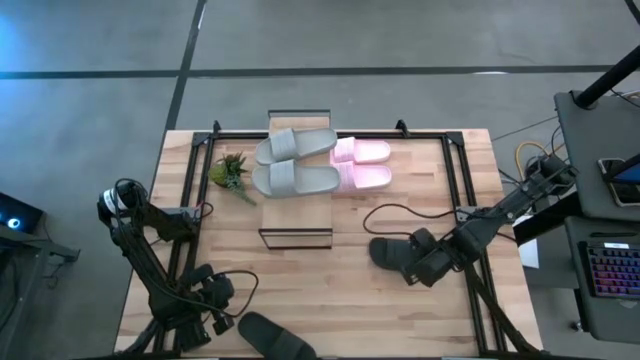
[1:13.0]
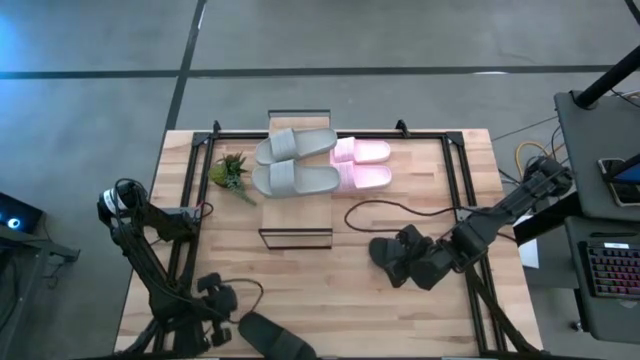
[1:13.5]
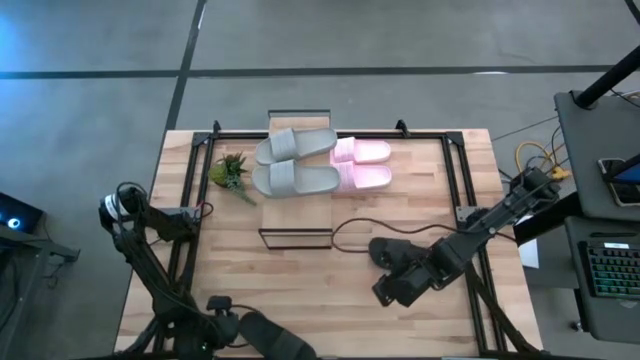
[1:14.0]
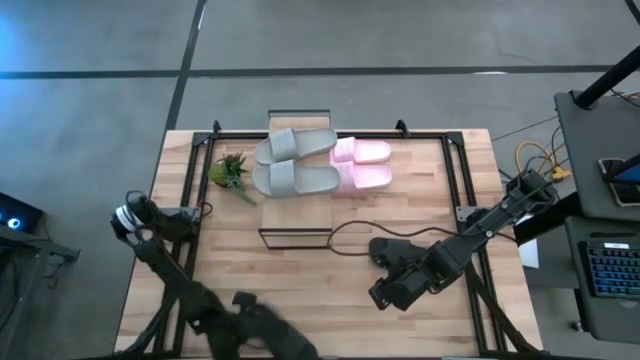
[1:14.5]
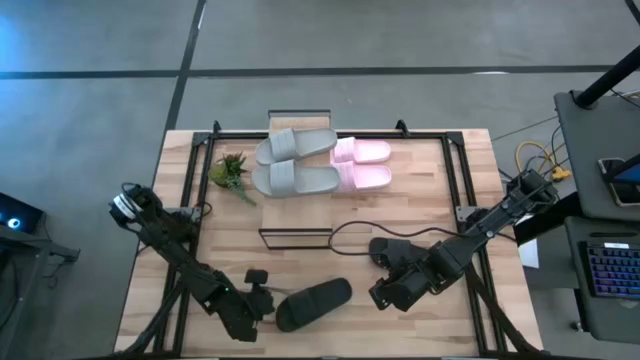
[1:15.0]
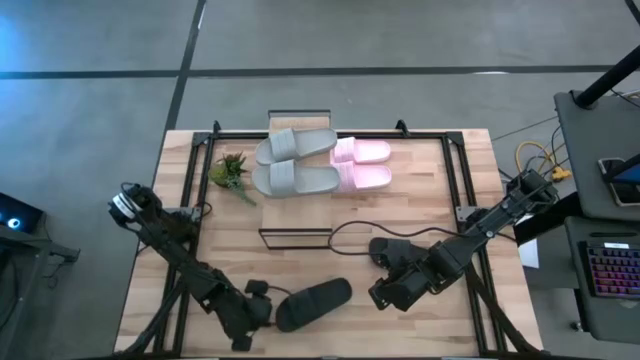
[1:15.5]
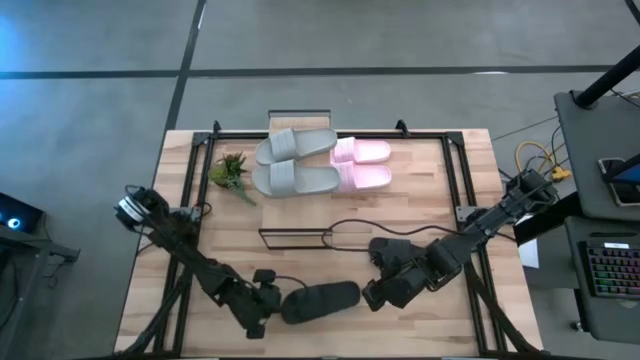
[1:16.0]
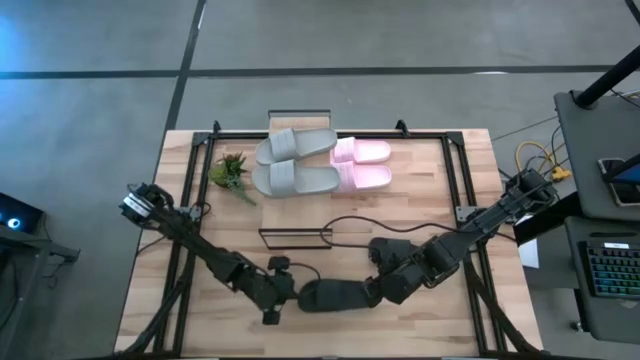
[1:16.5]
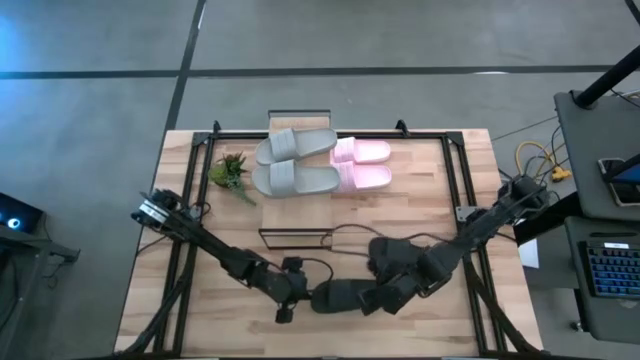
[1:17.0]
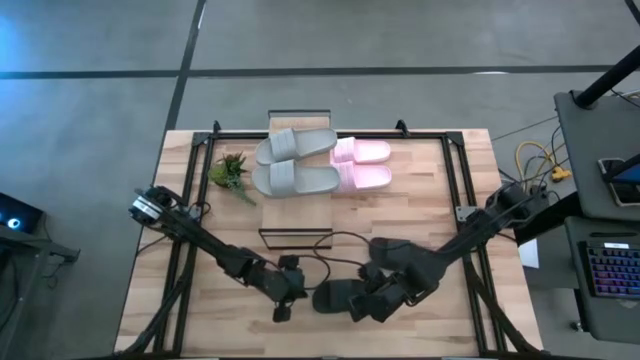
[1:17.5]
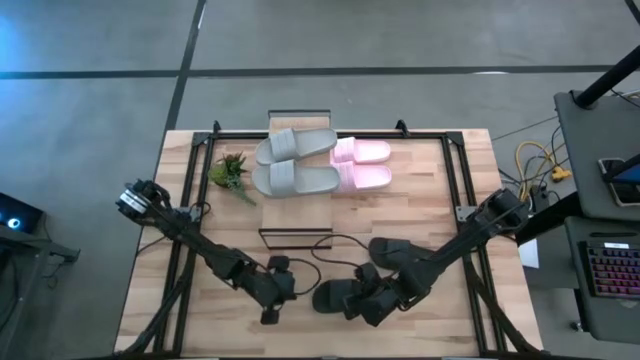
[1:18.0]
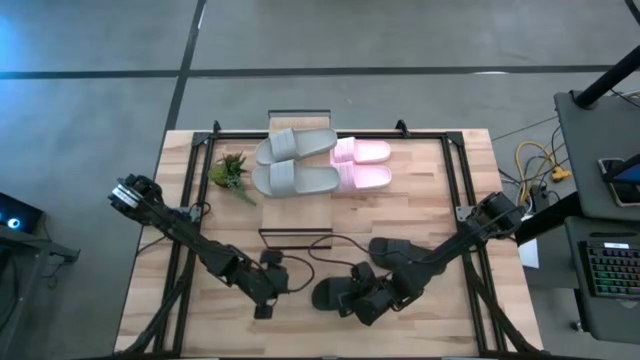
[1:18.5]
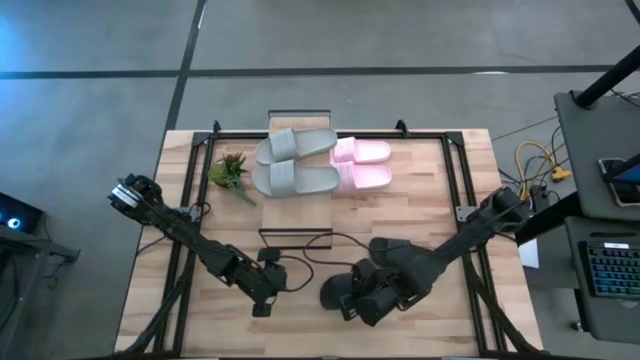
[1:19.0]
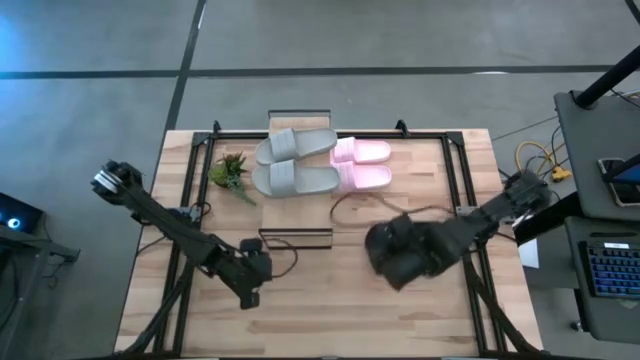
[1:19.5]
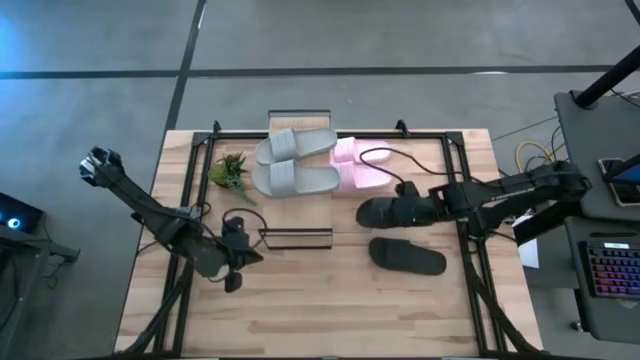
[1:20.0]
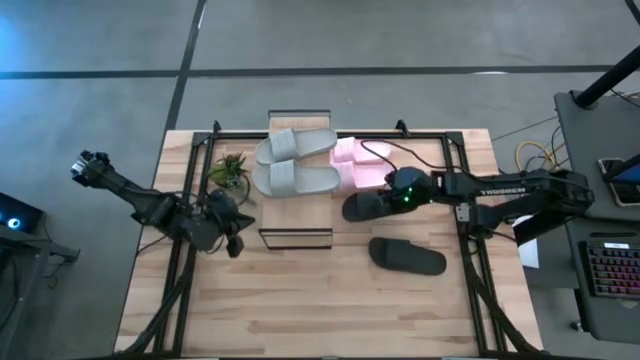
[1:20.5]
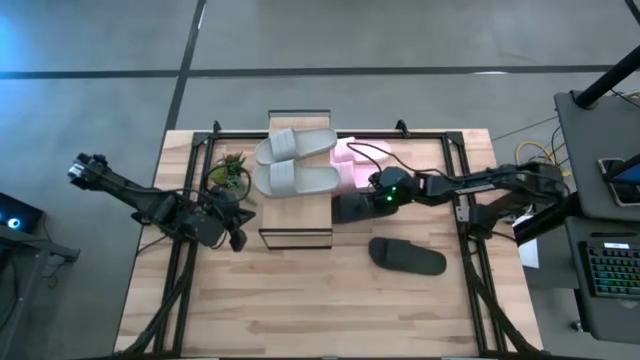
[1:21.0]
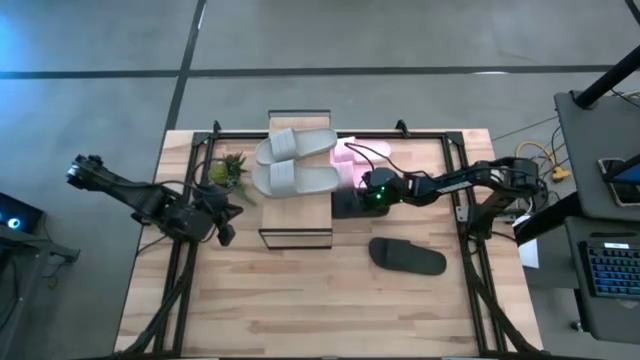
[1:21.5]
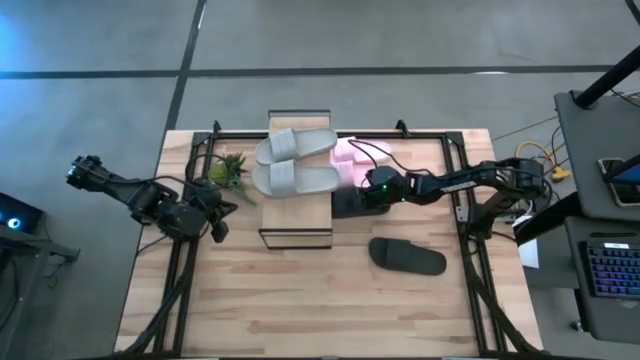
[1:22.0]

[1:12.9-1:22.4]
Task: Pick and place slides into the shelf
Move the bottom left black slide to the upper middle of the table aligned with the pink slide

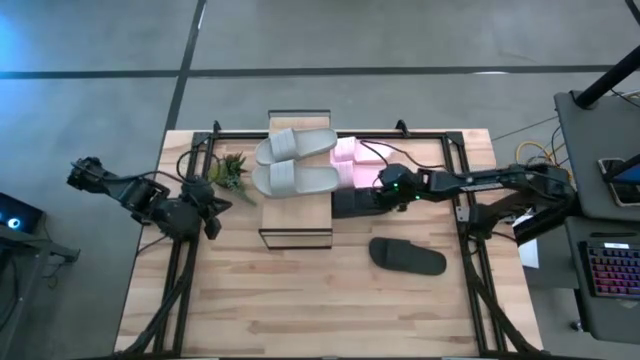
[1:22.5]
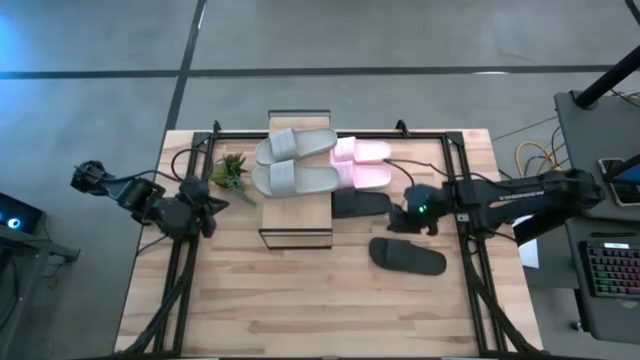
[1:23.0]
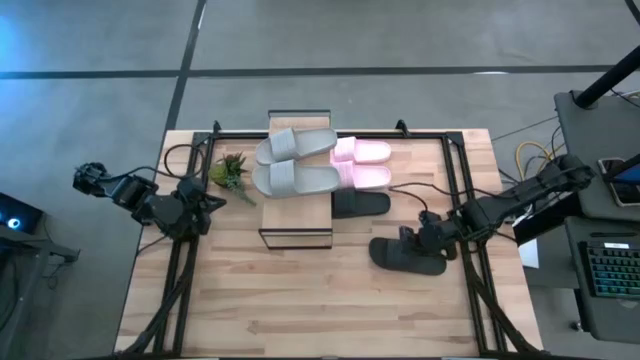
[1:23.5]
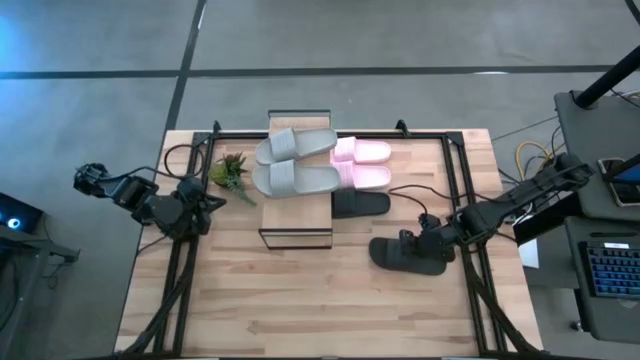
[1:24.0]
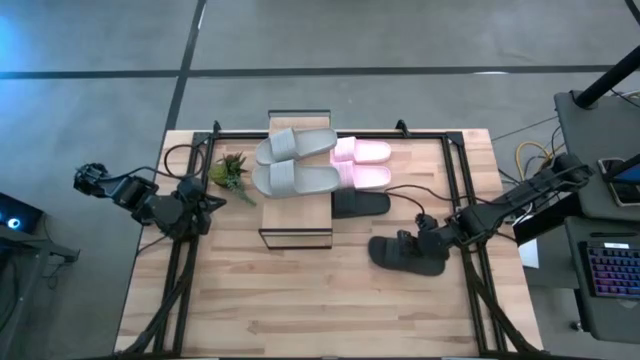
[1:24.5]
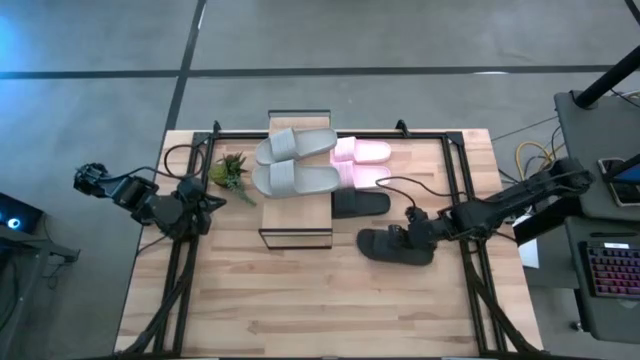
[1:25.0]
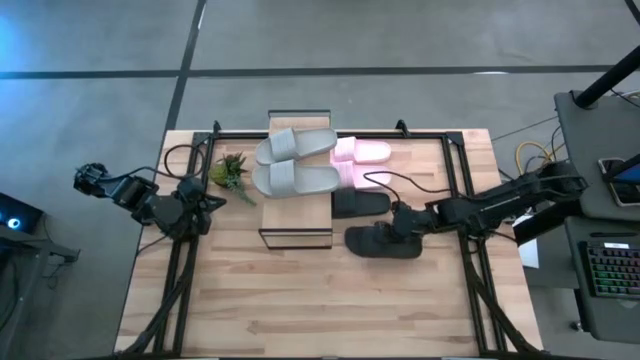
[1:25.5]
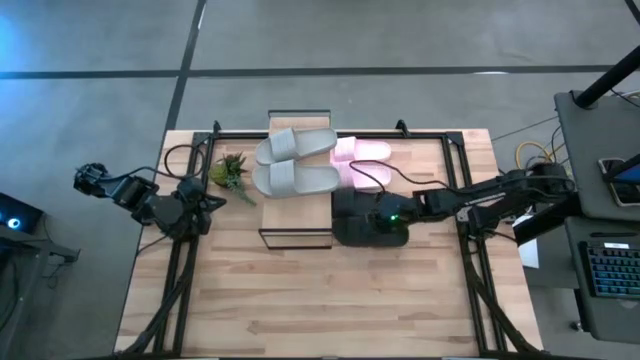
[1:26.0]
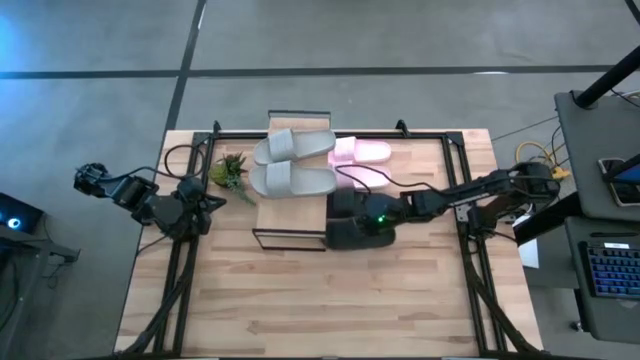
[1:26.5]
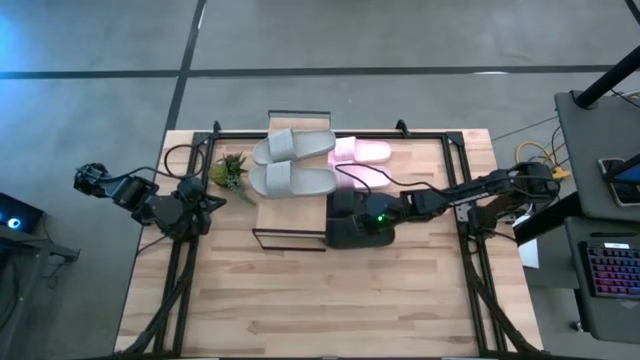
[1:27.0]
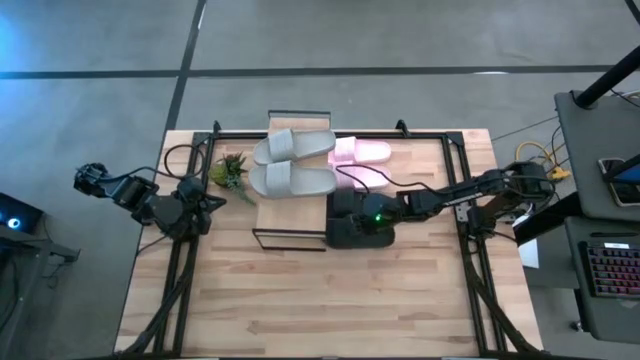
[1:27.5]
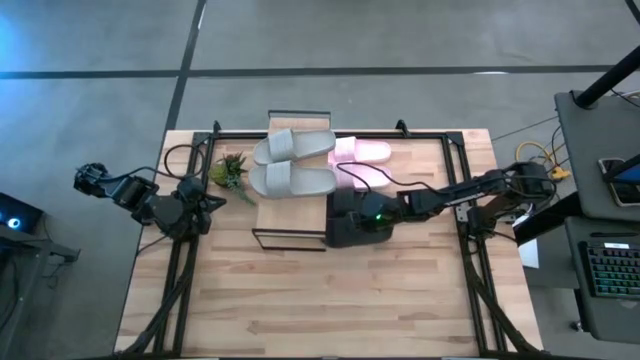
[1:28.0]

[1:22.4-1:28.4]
Move the bottom black slide to the center of the table aligned with the other black slide

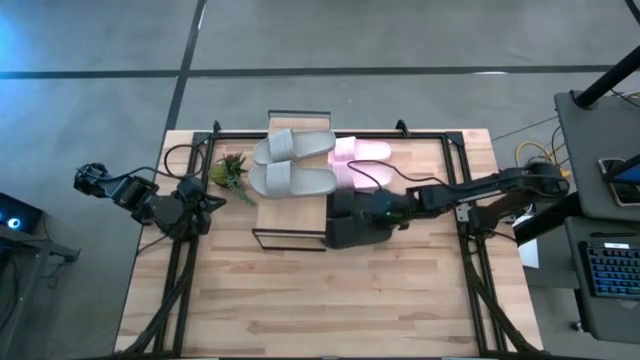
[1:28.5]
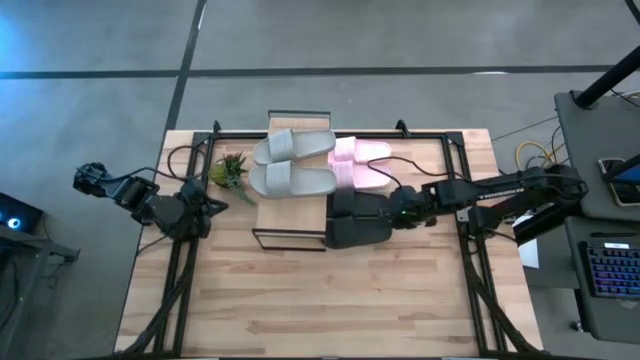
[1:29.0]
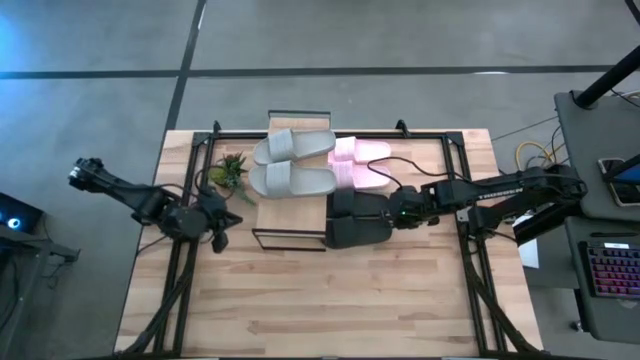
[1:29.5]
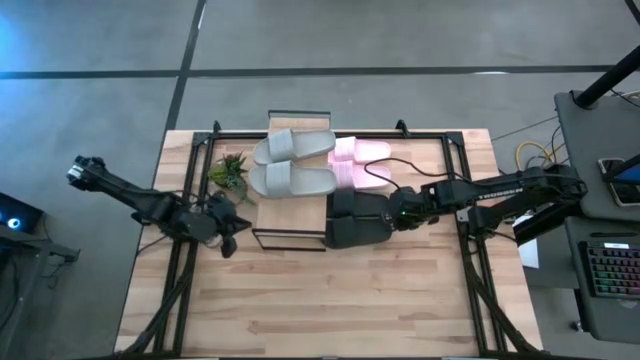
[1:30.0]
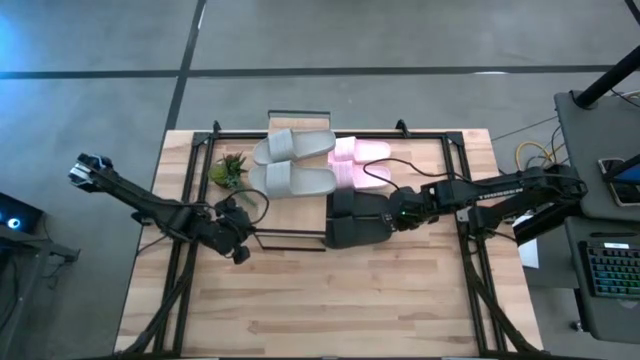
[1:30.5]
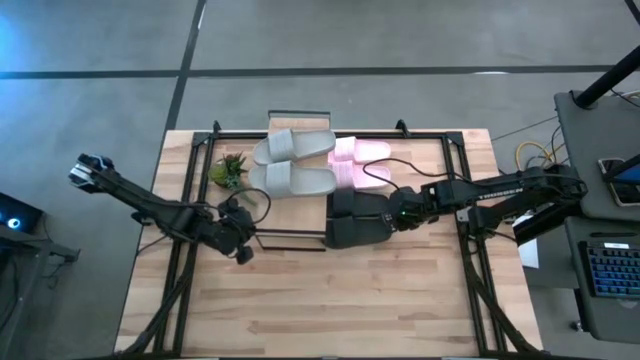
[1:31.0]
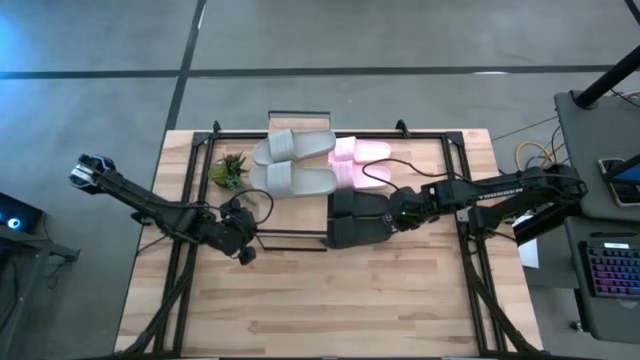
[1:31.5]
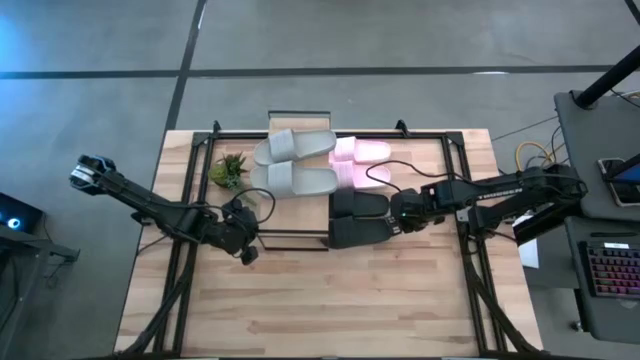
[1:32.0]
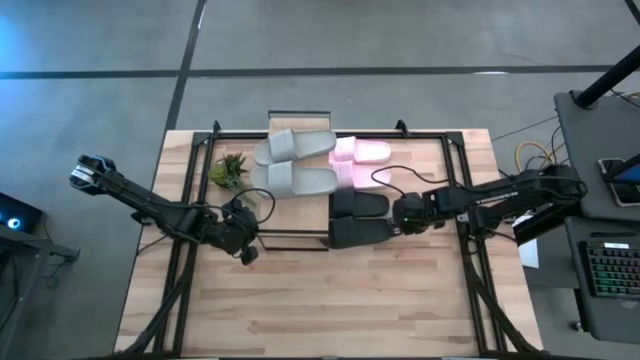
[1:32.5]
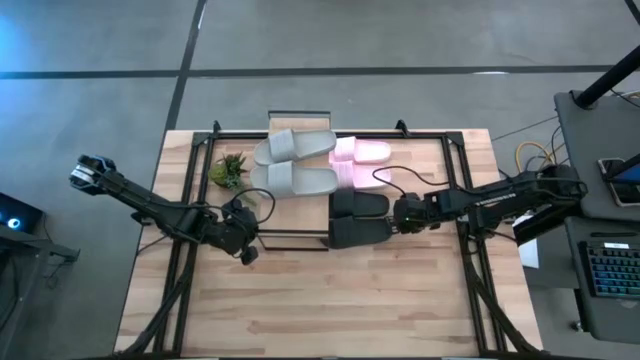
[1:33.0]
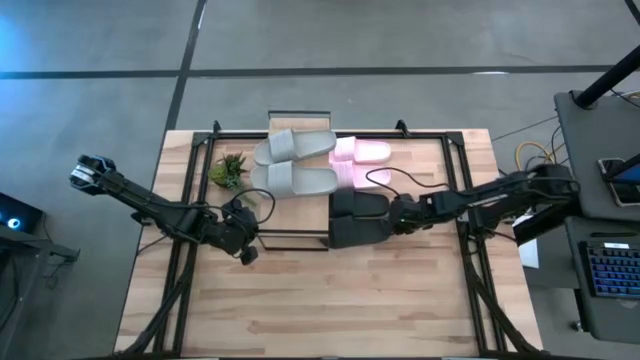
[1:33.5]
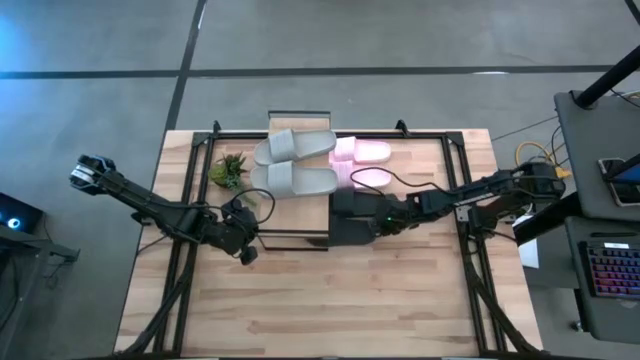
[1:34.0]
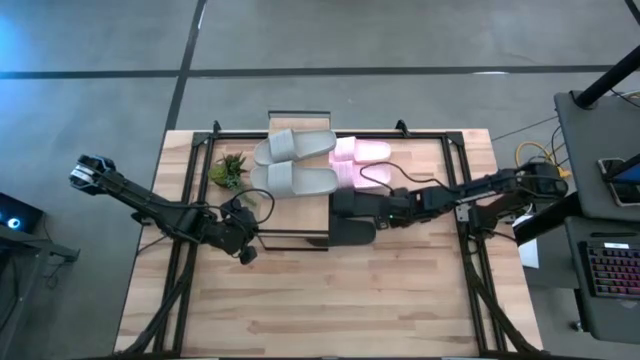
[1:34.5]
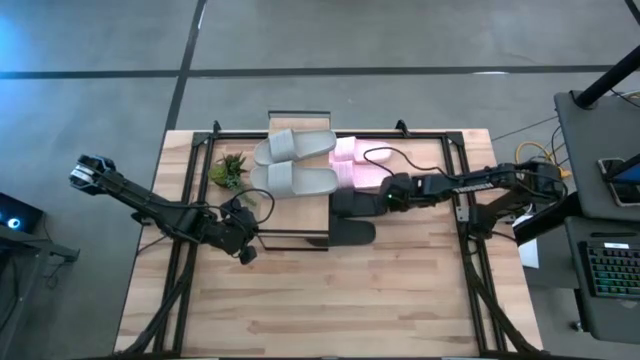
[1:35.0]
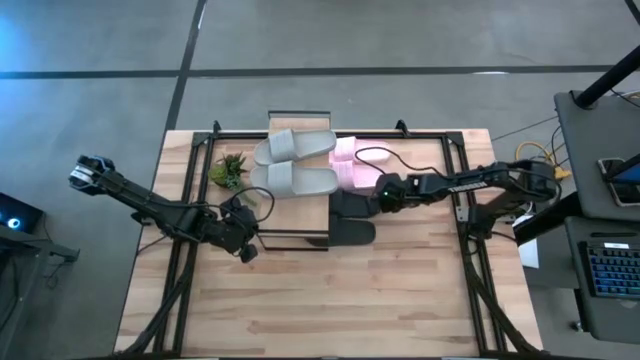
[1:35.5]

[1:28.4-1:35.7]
Adjust the black slides under the shelf
